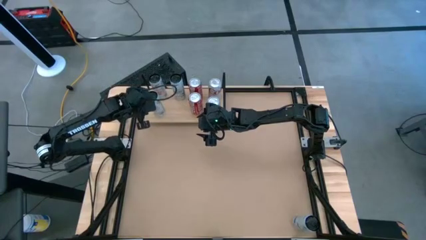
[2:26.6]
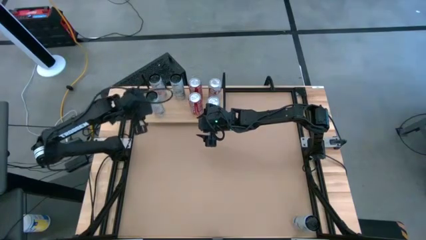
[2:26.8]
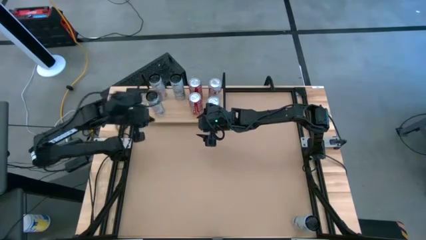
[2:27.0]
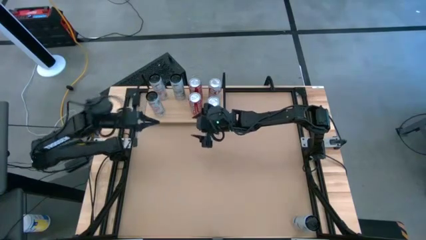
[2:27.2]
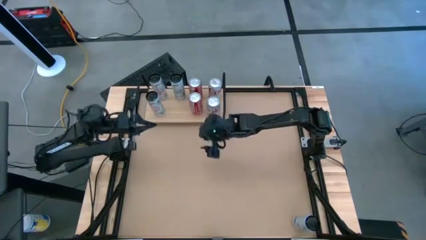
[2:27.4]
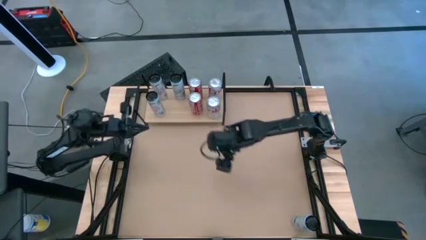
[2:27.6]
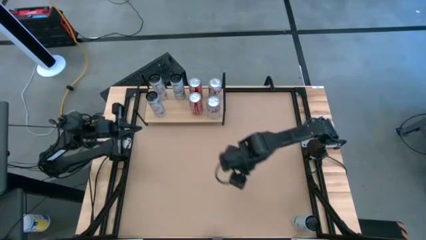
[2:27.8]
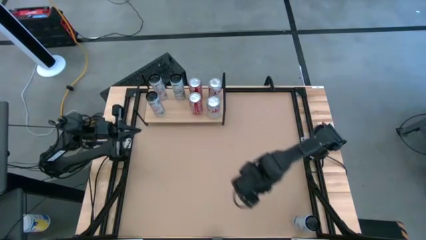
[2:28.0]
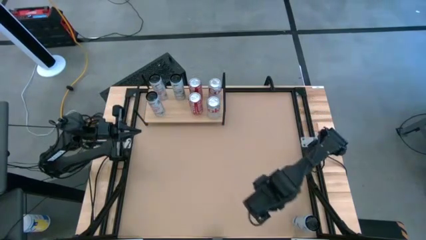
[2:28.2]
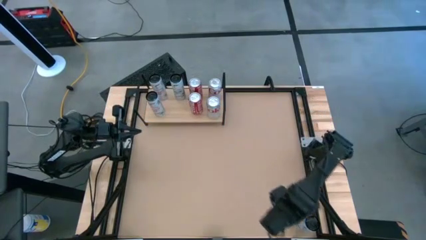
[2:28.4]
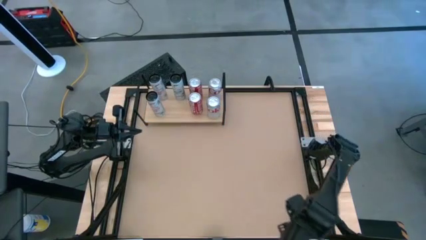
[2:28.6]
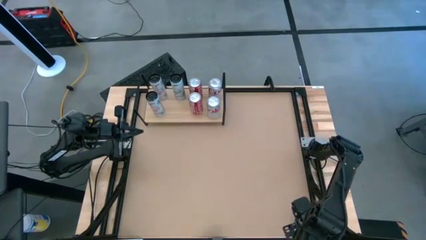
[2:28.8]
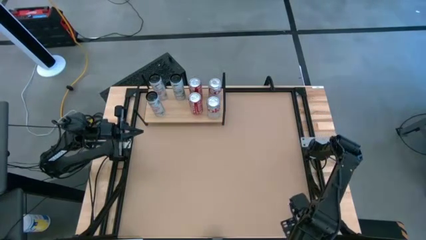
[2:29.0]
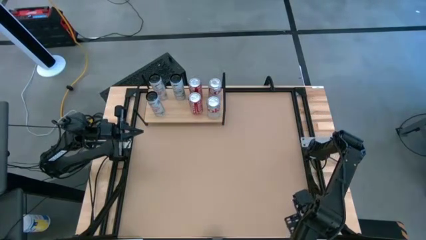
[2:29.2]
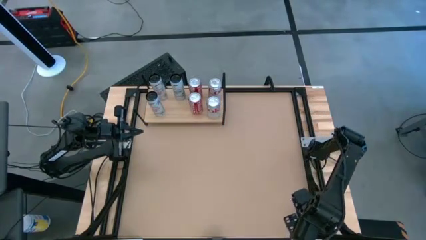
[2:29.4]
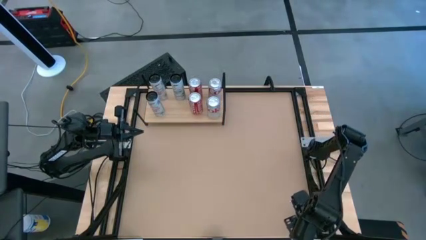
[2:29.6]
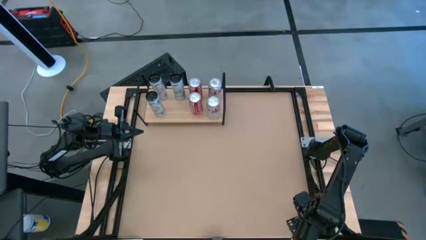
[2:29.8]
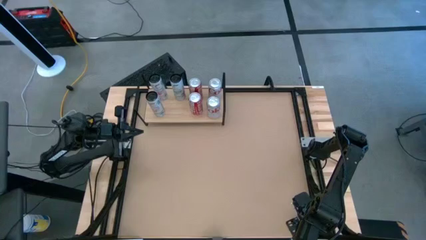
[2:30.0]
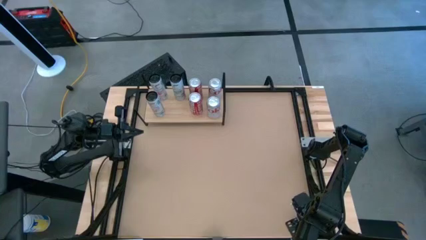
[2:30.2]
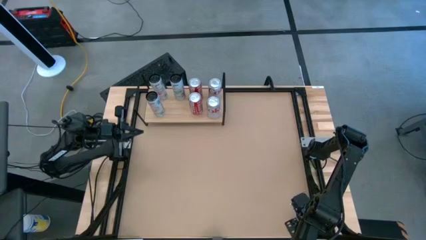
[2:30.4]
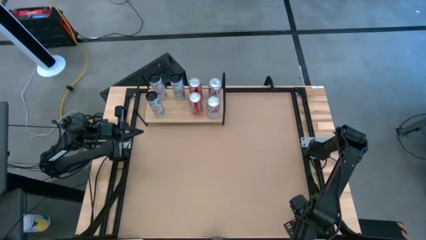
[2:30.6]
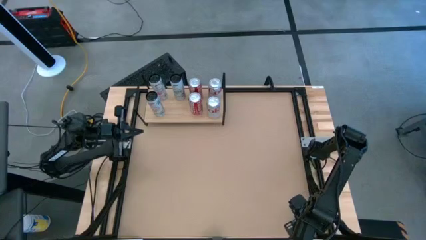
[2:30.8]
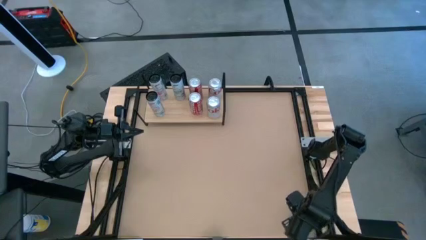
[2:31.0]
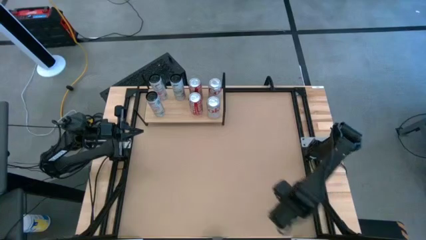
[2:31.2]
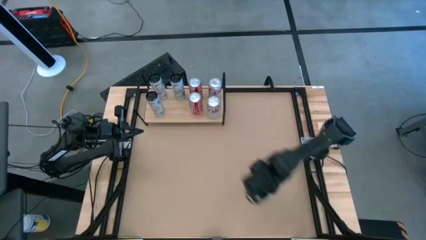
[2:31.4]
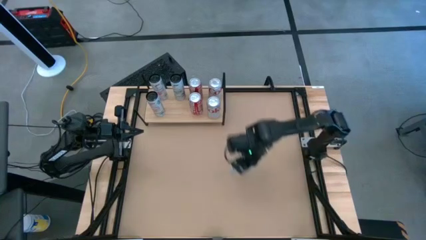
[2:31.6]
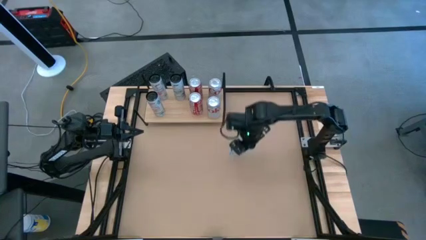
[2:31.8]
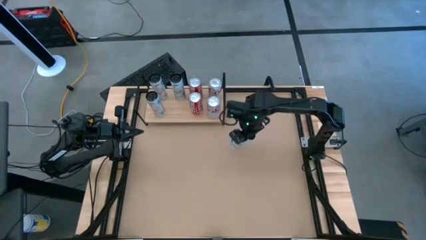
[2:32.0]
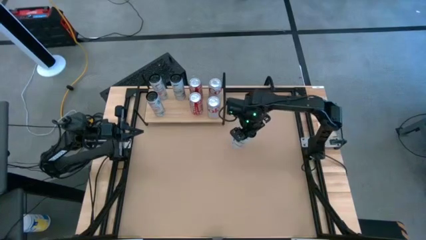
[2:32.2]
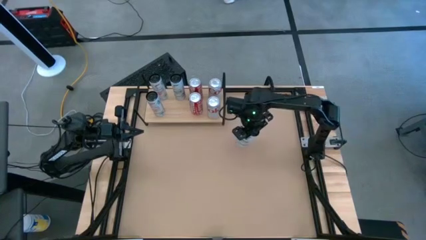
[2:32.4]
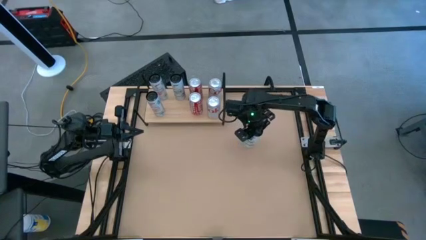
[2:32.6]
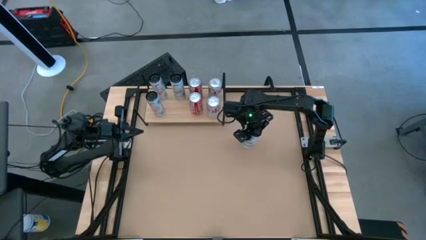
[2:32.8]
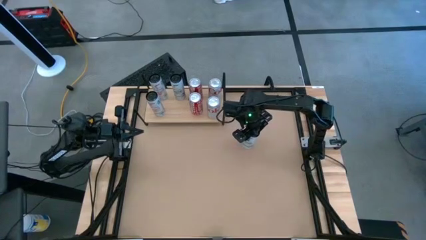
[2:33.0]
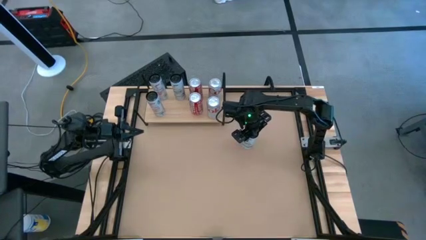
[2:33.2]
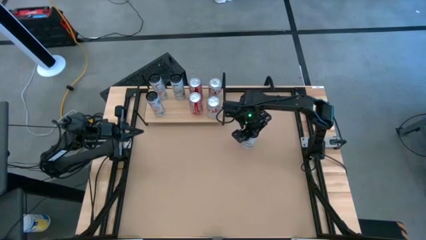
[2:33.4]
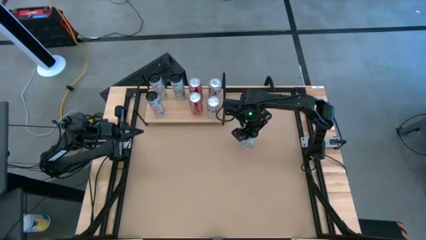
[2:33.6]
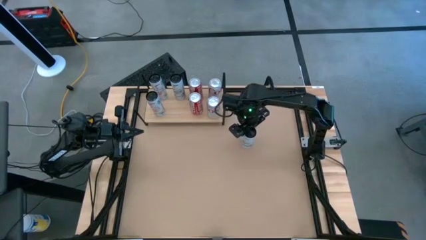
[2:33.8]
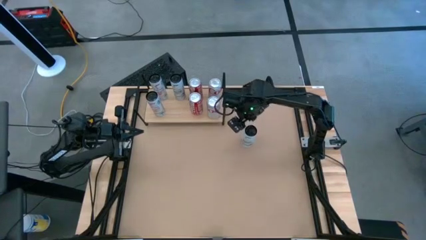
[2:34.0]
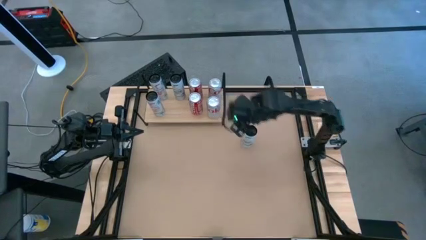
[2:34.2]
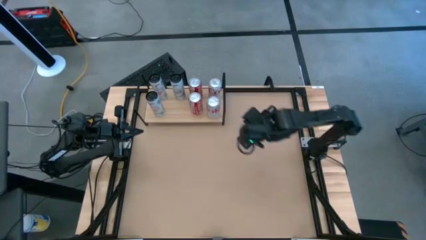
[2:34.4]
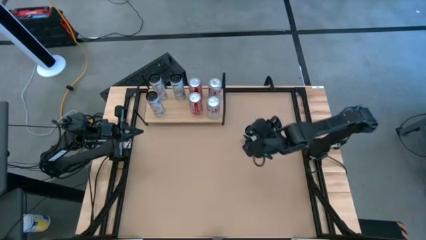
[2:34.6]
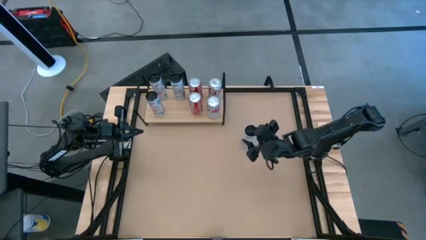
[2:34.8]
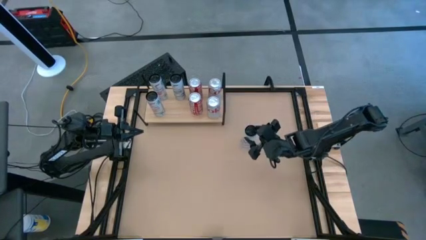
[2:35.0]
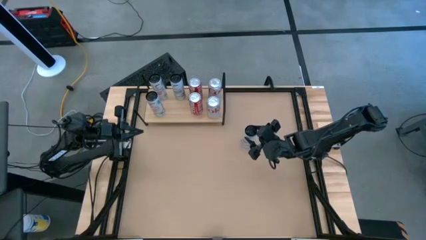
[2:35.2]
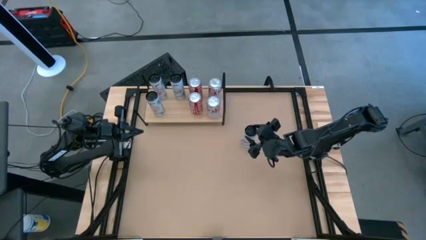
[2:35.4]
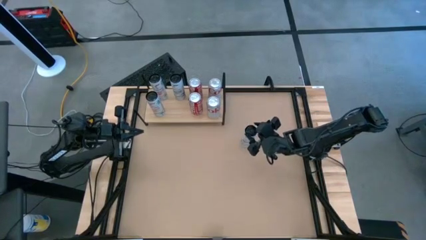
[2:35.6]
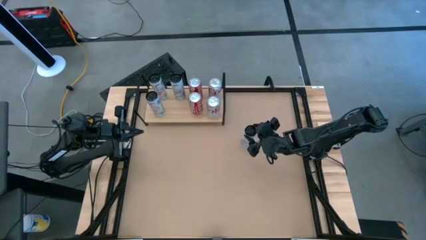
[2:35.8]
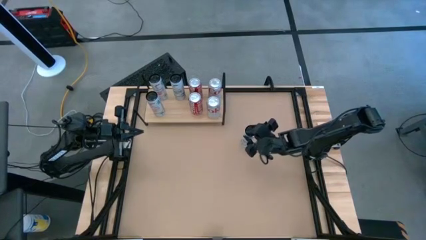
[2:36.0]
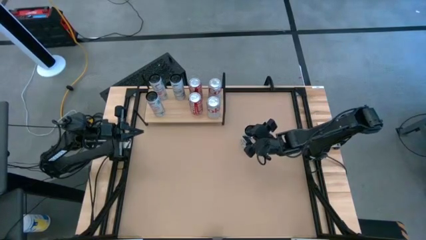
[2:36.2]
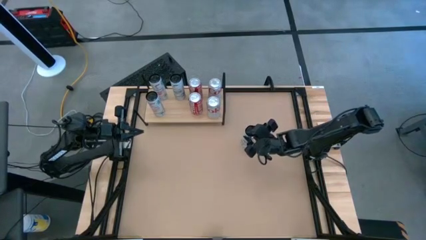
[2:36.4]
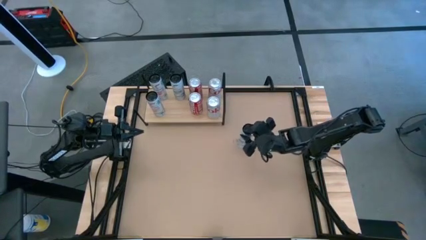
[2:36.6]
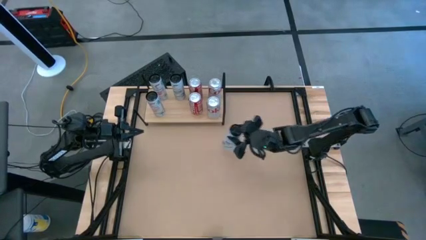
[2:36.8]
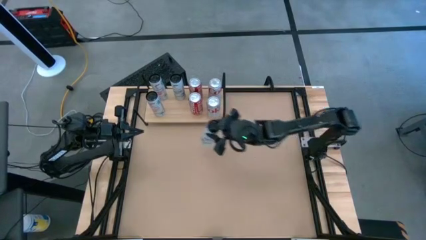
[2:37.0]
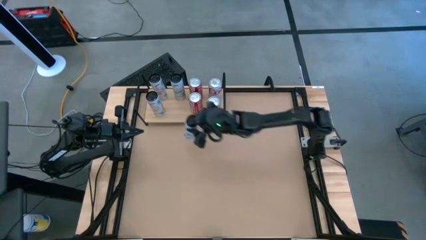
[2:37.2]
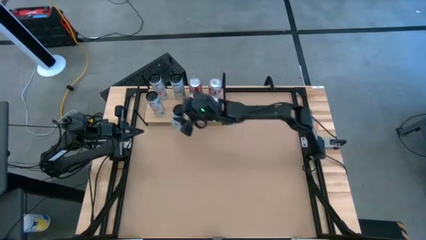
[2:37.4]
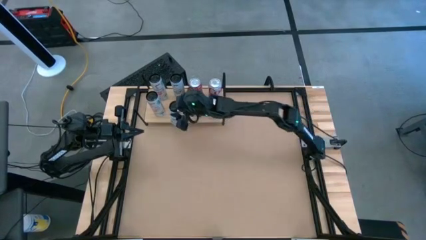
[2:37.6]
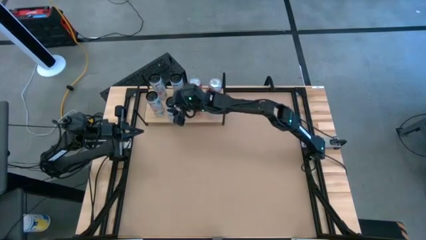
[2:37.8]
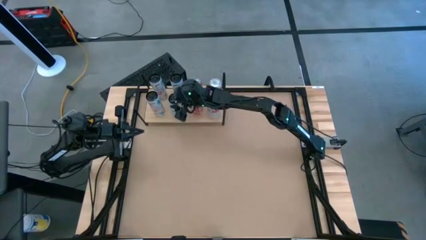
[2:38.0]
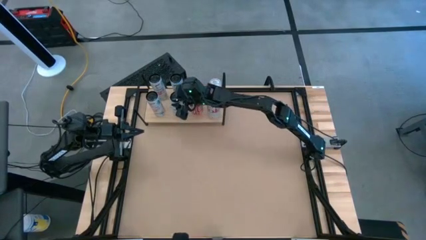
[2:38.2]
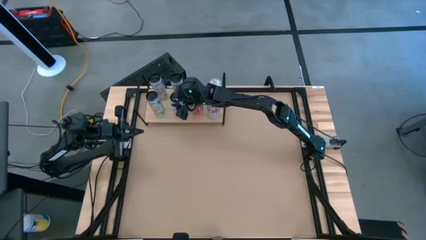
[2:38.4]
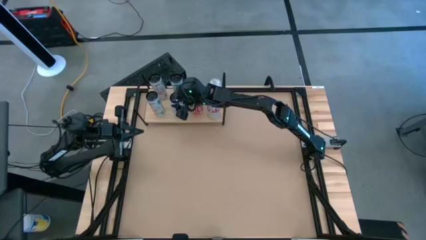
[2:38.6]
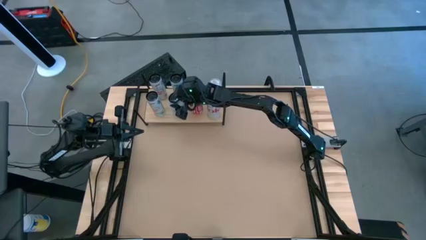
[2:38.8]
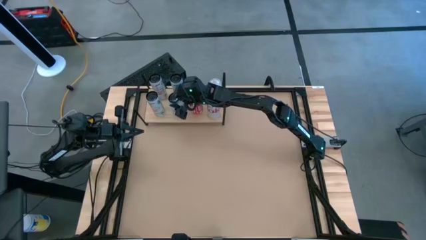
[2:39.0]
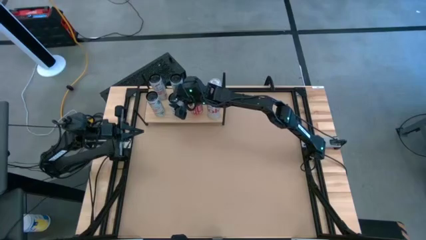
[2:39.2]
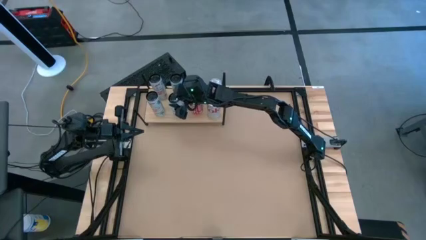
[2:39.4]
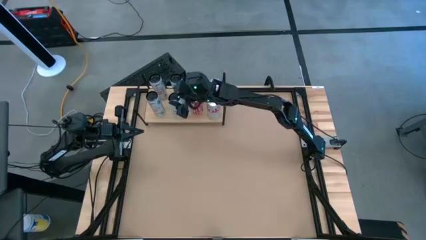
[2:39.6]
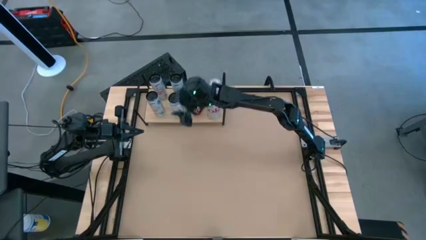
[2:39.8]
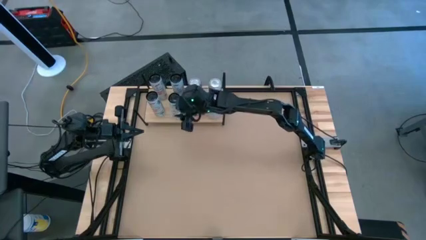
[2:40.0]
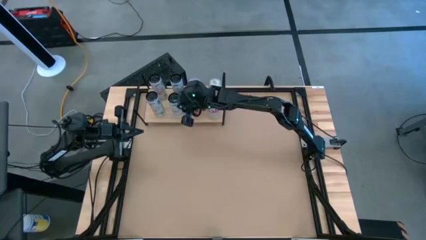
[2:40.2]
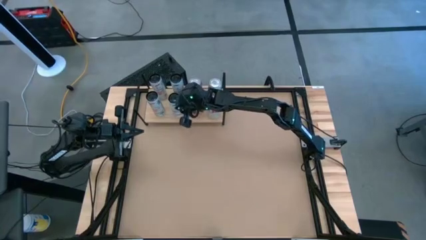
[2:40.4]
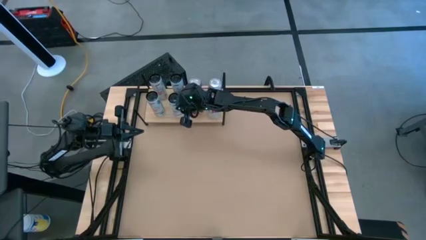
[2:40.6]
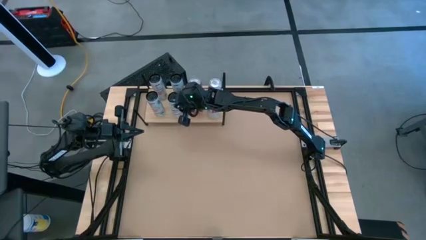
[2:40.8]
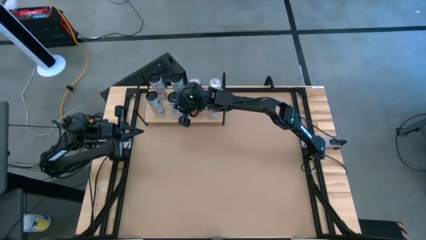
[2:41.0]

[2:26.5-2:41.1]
Task: Place canned beverage on shelf
Put the white and blue soda can on the shelf aligned with the other white and blue soda can

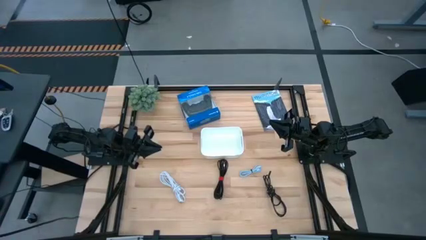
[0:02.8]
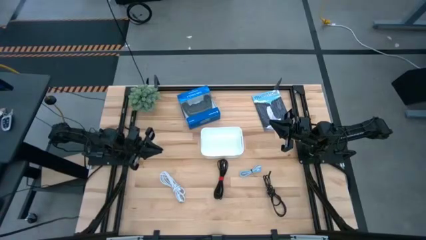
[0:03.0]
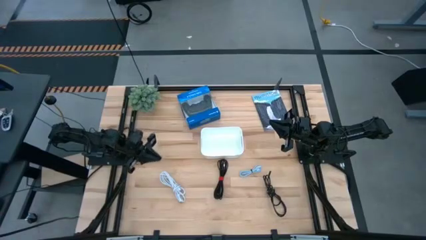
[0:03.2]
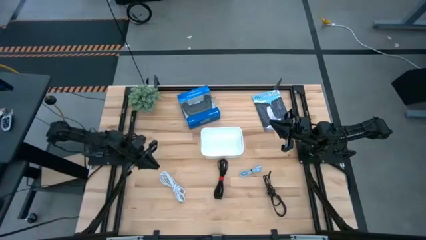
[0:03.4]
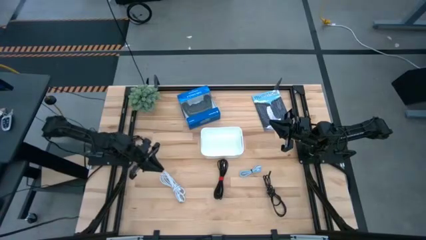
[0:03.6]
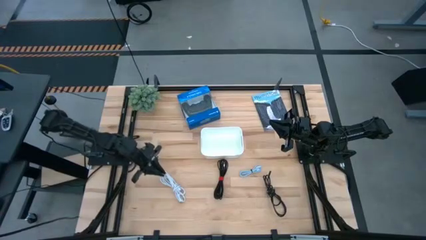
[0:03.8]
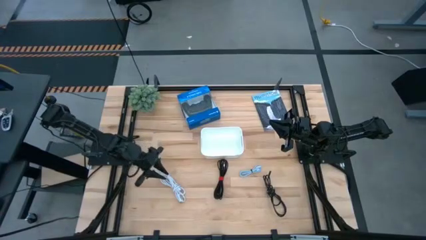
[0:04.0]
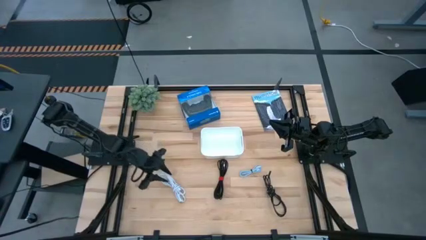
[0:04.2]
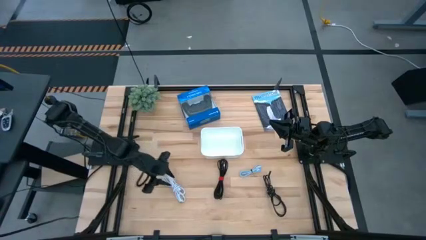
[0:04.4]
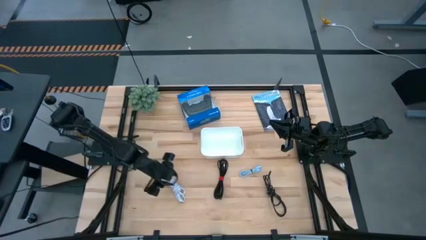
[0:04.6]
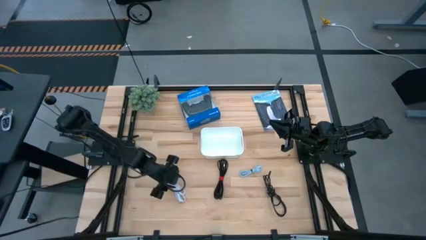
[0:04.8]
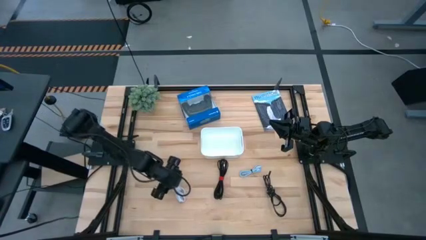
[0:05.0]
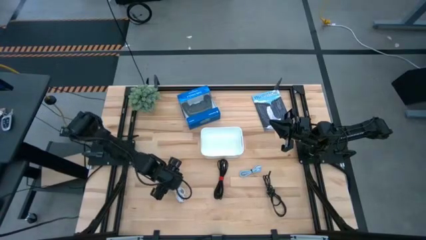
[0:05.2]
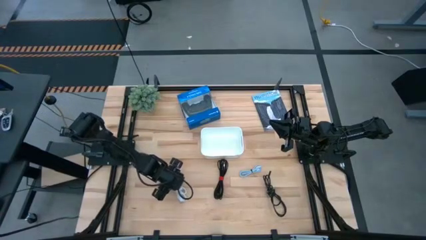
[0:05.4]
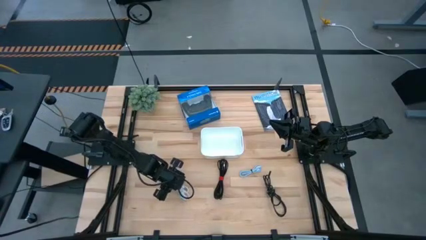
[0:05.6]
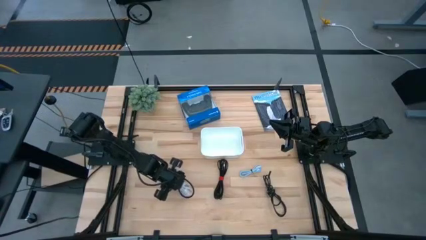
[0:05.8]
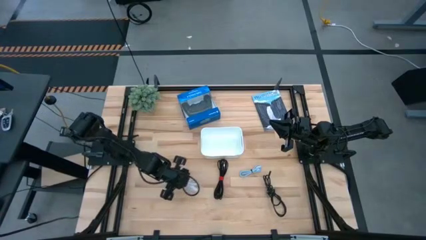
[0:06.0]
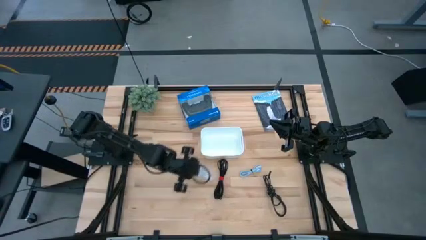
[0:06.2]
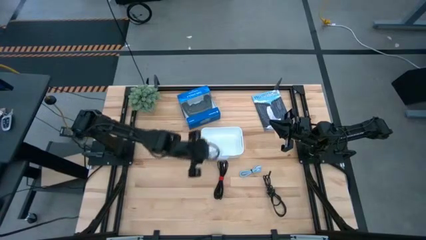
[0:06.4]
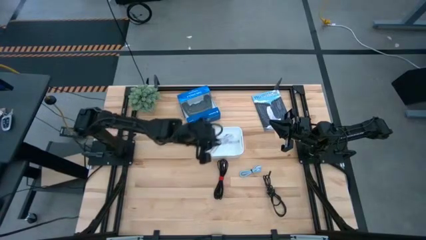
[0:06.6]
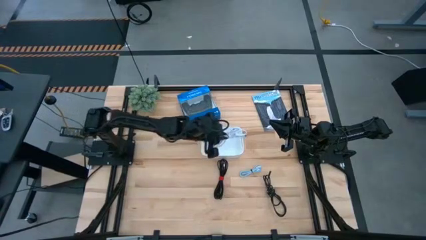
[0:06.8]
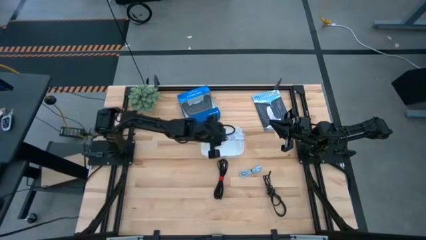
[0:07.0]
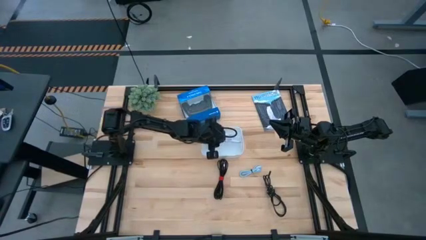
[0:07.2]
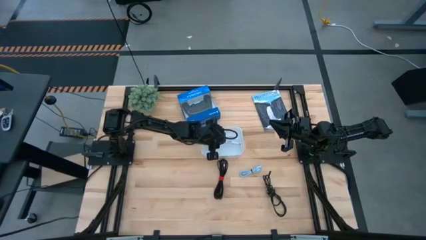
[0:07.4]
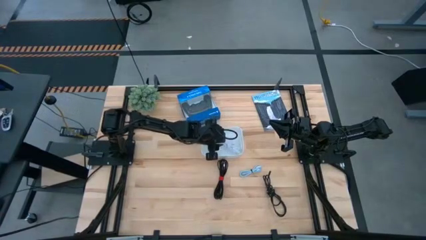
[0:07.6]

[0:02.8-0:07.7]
Task: Pick and place USB-C Cables
Put the white charger cable into the white bin
